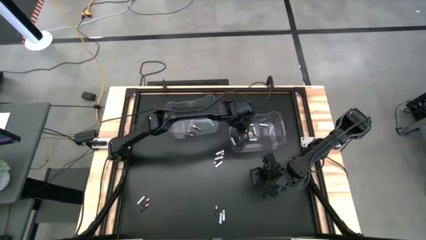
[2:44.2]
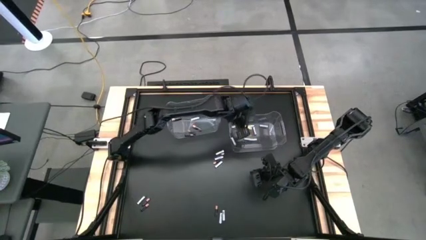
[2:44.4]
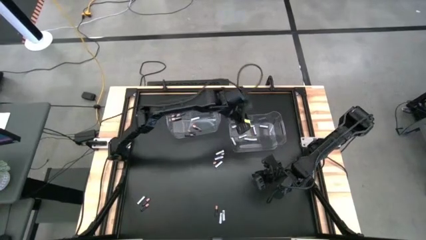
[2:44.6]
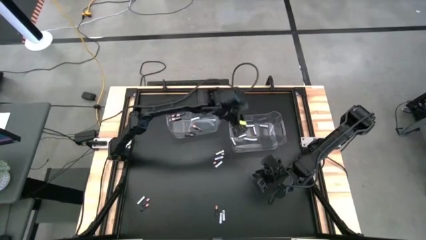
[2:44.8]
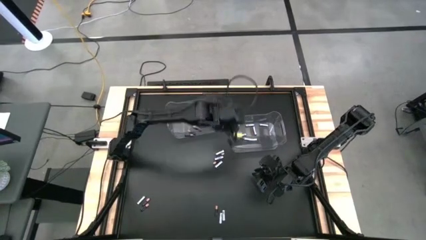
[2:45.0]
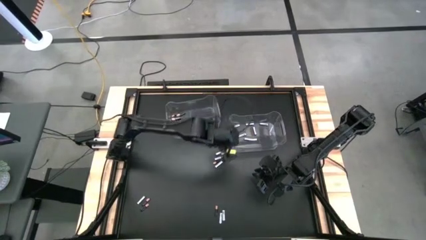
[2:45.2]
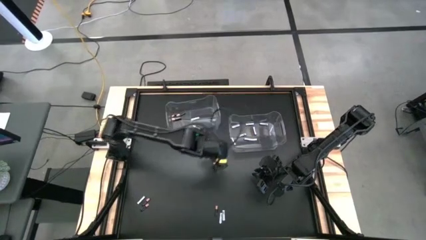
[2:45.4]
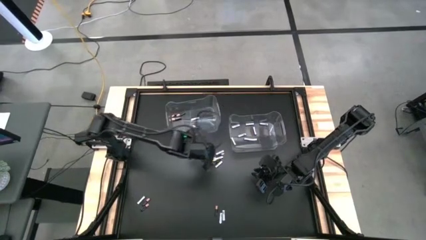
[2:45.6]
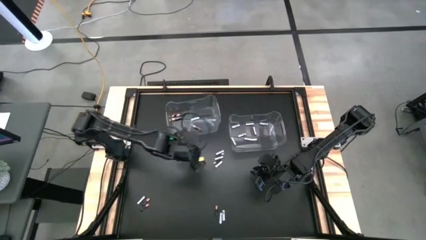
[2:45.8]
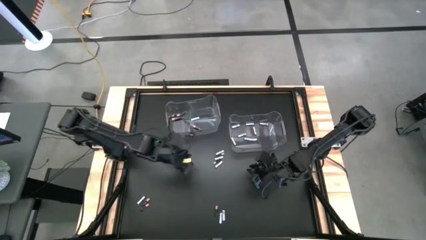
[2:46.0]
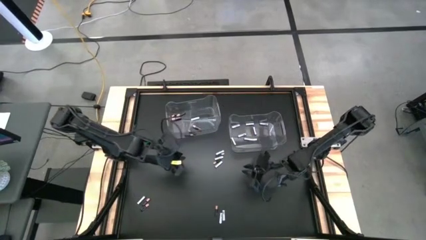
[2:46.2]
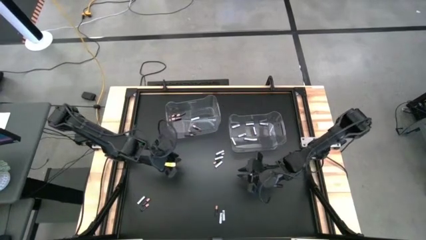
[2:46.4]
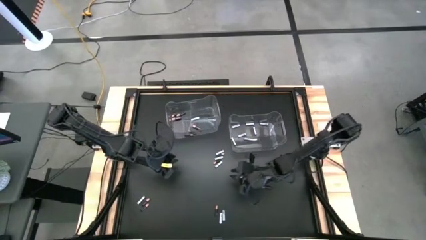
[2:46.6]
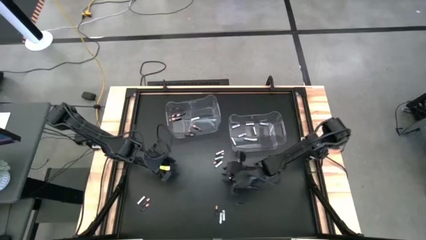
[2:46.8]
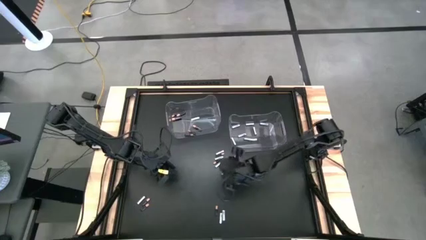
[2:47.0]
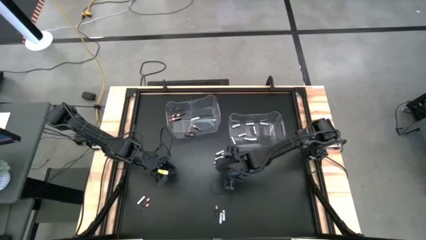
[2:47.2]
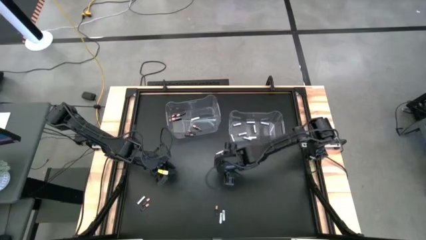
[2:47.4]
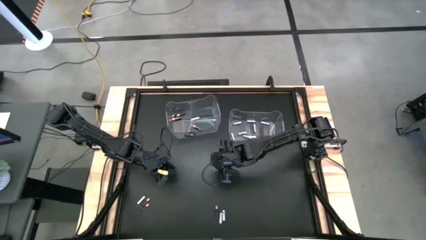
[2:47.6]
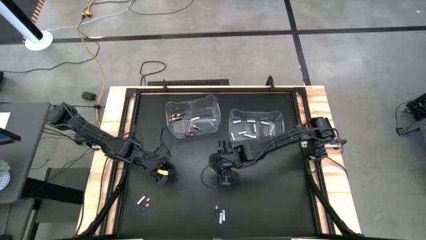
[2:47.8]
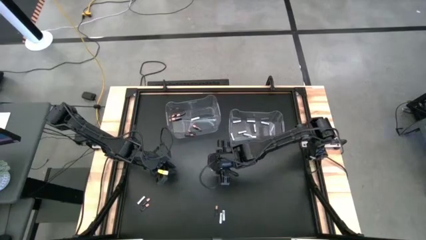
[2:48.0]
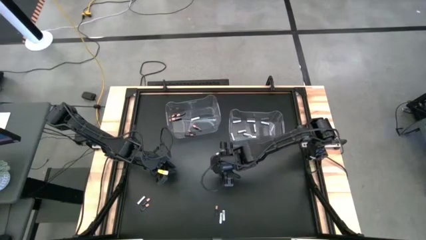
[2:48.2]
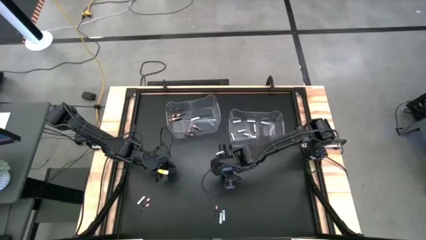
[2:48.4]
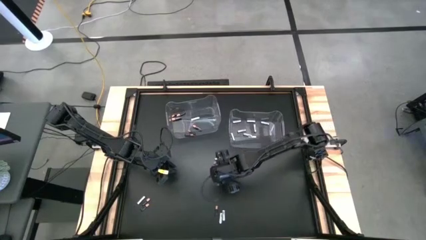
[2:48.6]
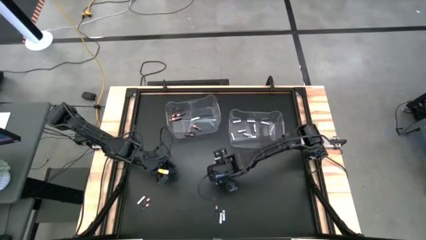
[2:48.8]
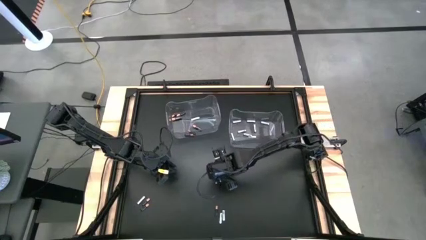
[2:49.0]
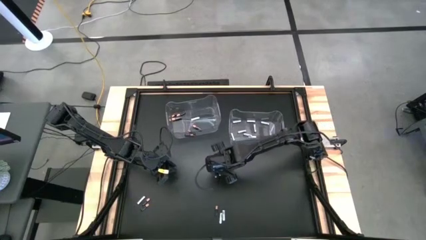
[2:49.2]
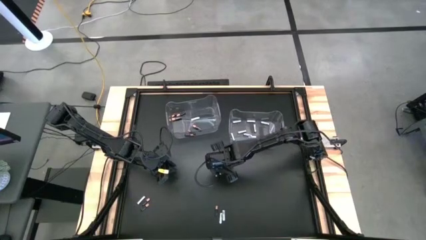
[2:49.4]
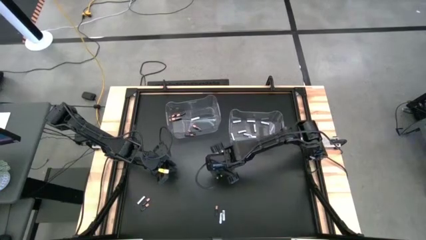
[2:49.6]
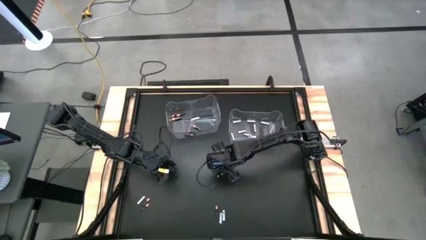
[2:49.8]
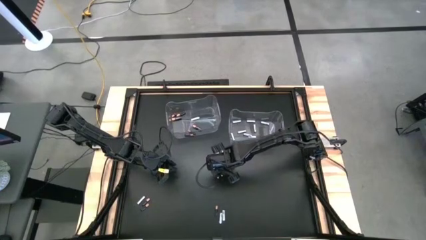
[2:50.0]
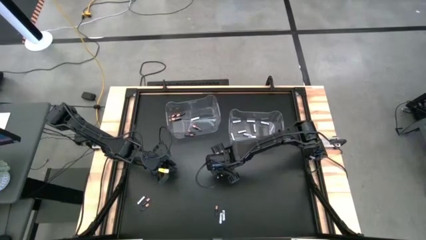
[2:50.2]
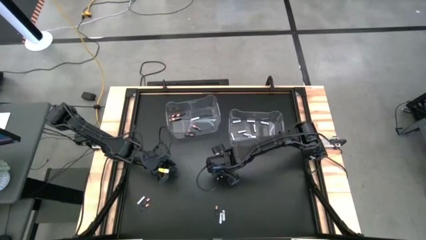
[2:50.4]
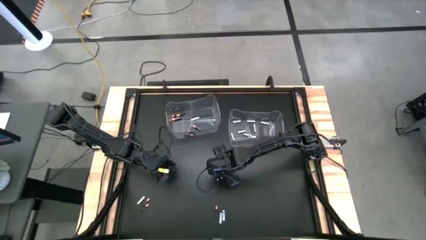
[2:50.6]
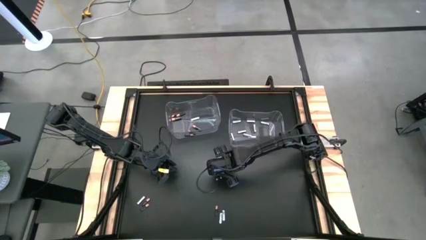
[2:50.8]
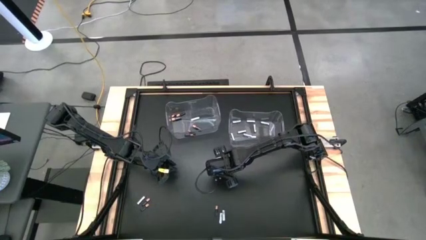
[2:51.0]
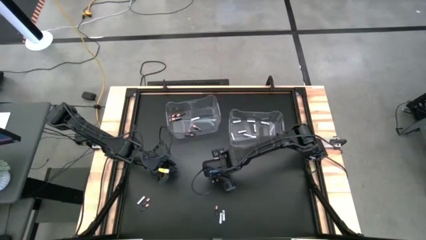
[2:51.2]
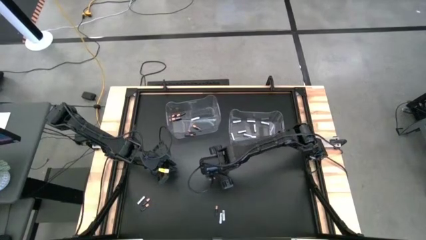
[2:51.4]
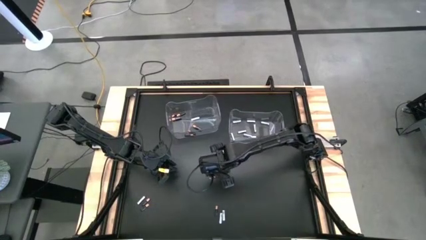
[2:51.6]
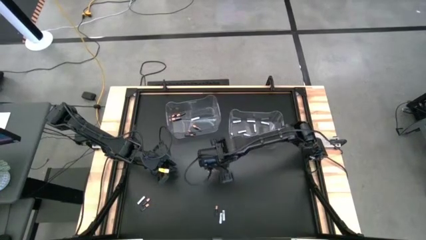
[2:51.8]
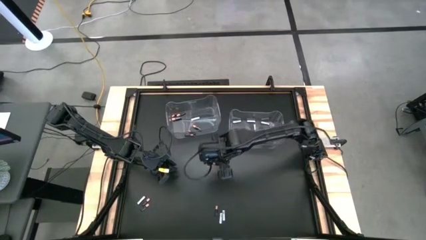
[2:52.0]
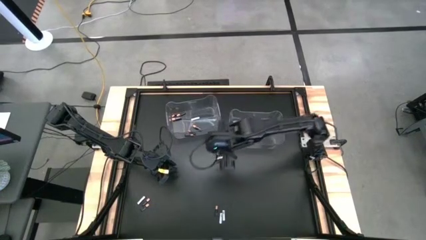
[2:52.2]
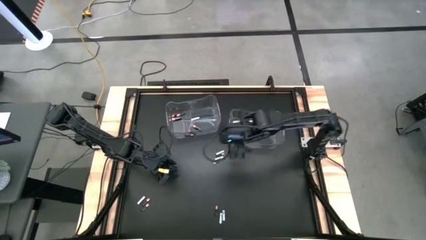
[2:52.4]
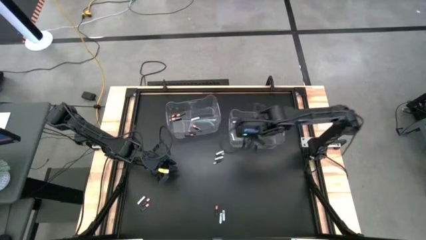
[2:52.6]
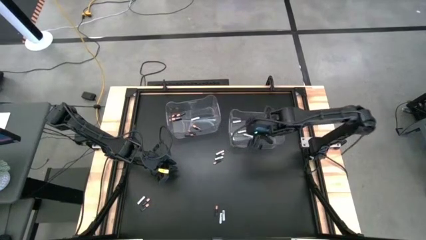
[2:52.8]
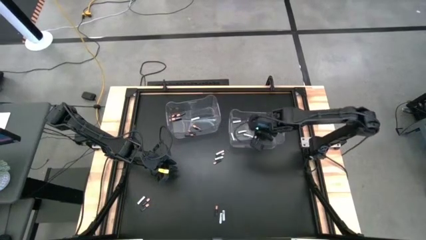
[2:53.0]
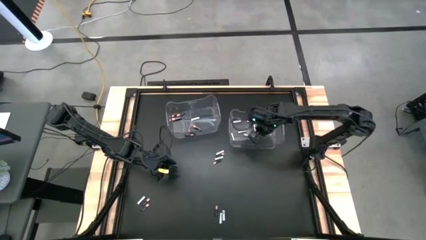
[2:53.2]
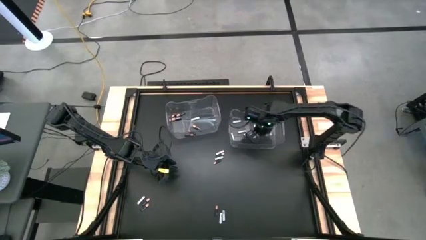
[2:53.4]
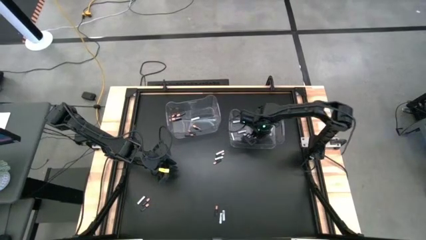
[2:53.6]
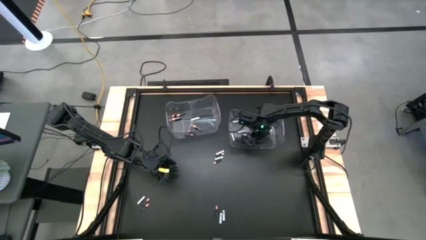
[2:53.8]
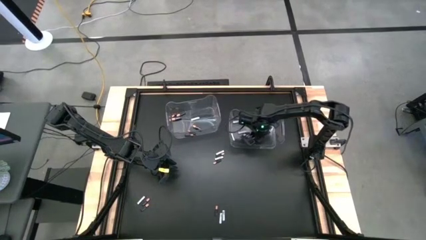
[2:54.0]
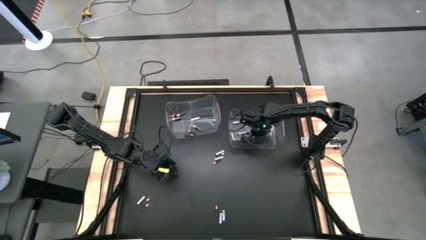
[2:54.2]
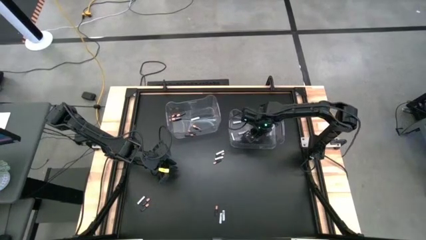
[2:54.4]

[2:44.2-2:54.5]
Task: Sort batteries
Put the white battery into the right transparent bin

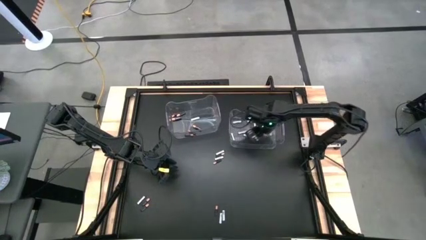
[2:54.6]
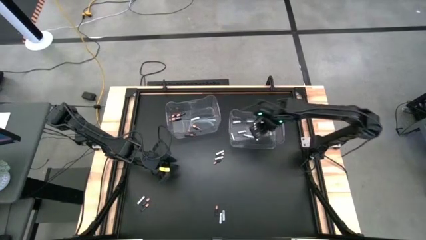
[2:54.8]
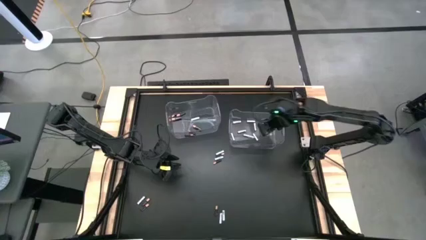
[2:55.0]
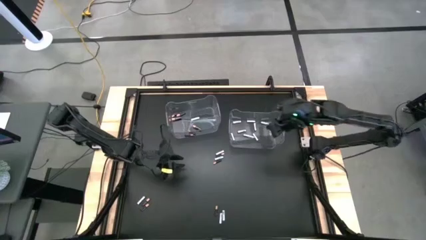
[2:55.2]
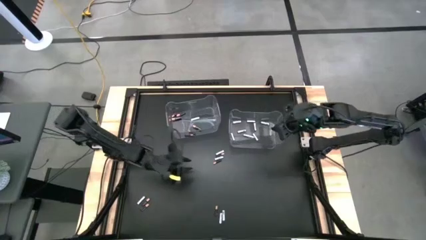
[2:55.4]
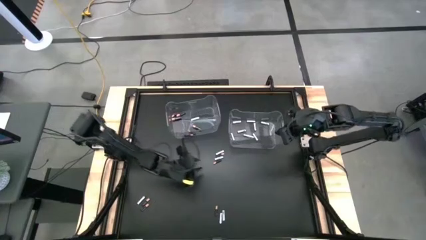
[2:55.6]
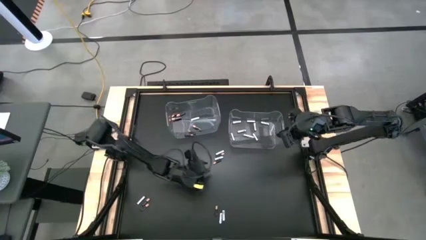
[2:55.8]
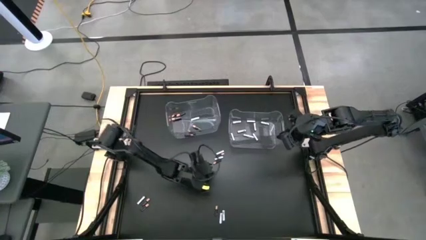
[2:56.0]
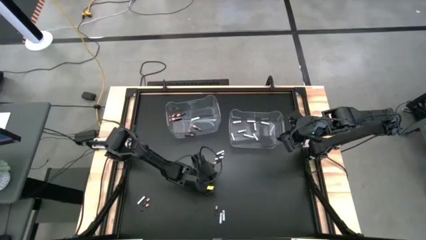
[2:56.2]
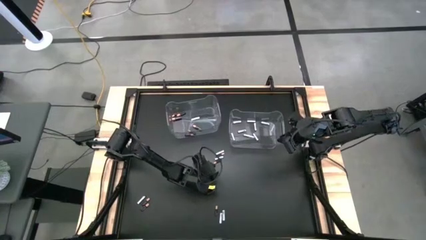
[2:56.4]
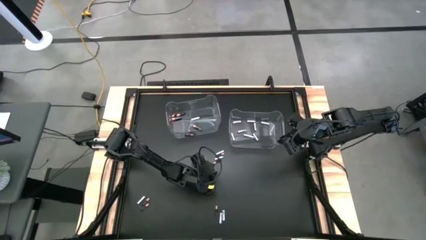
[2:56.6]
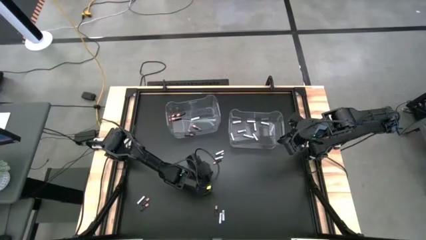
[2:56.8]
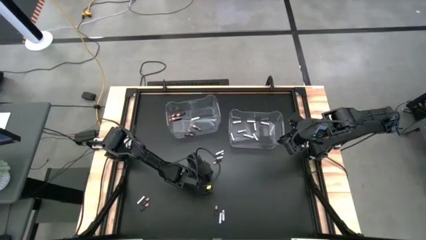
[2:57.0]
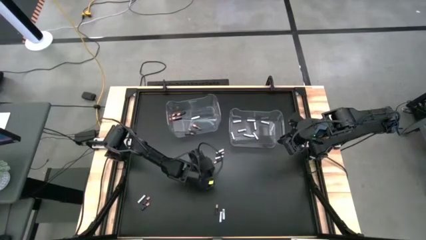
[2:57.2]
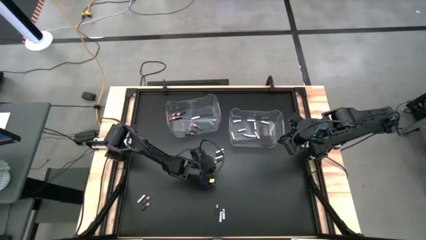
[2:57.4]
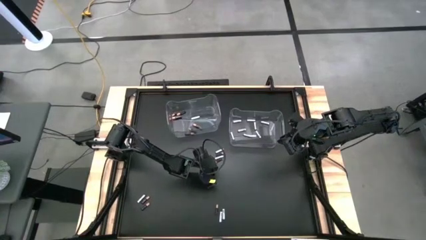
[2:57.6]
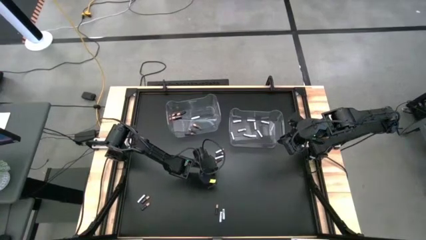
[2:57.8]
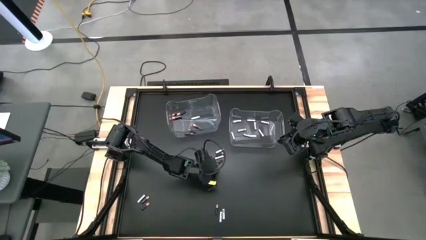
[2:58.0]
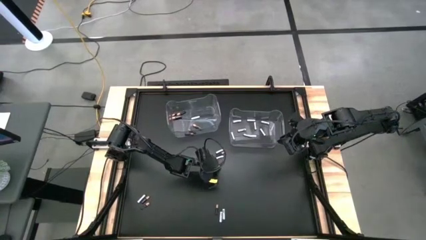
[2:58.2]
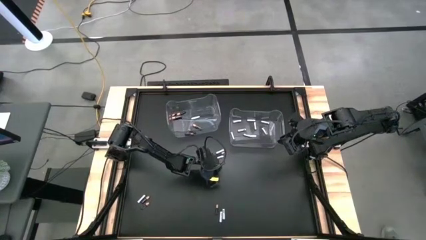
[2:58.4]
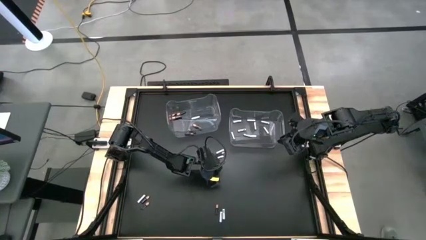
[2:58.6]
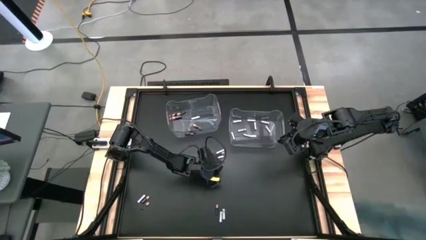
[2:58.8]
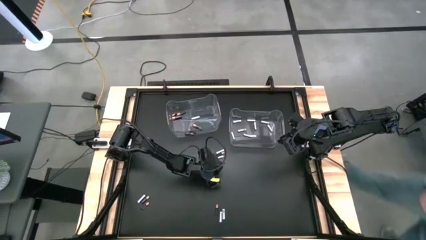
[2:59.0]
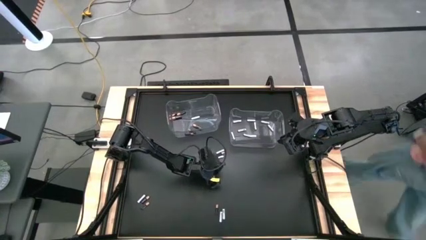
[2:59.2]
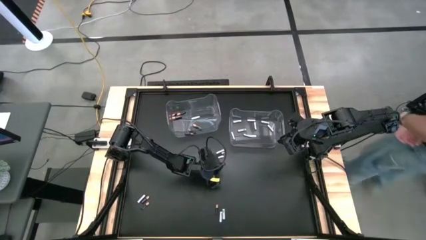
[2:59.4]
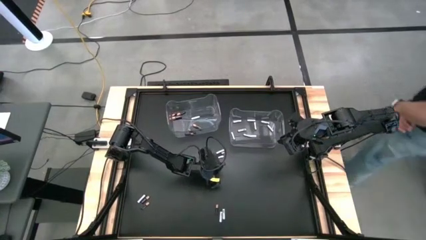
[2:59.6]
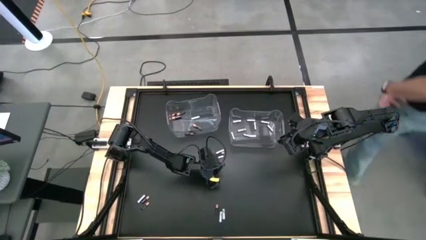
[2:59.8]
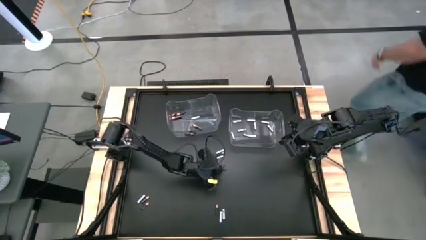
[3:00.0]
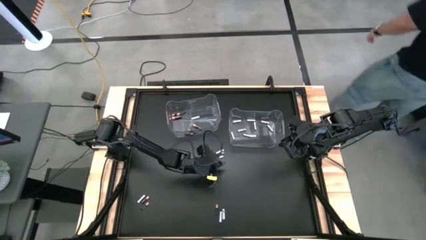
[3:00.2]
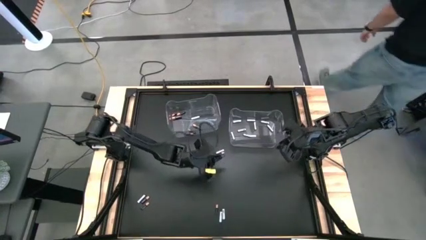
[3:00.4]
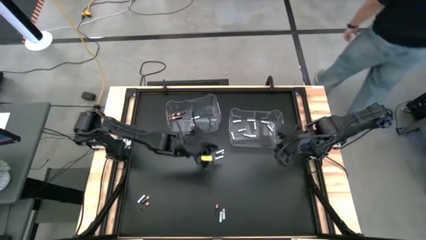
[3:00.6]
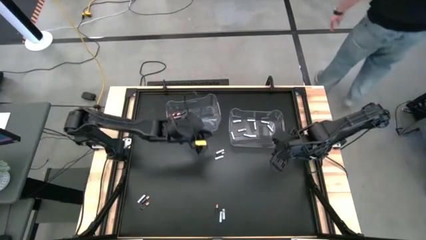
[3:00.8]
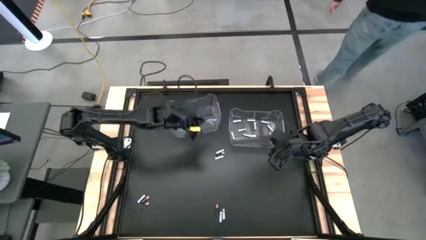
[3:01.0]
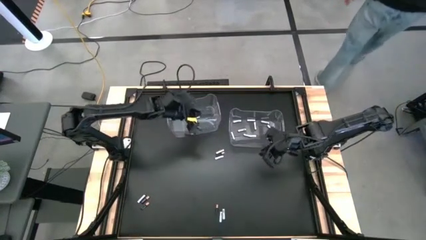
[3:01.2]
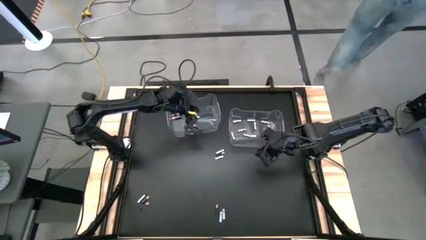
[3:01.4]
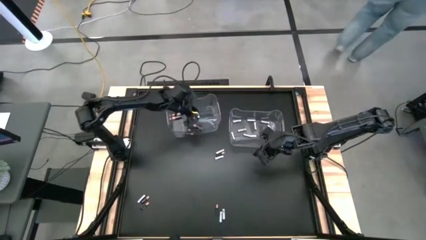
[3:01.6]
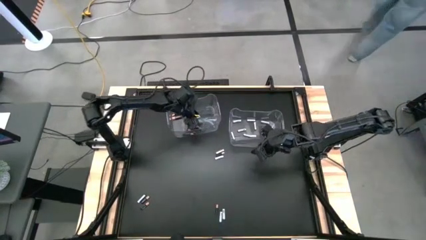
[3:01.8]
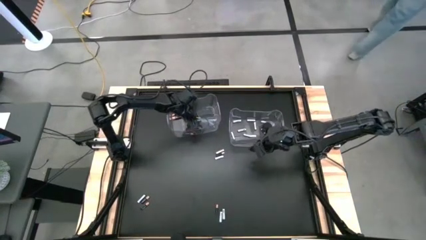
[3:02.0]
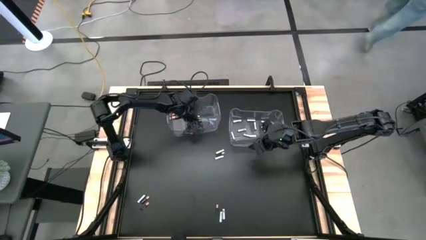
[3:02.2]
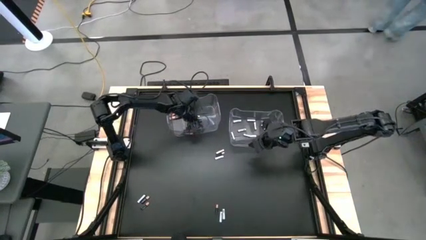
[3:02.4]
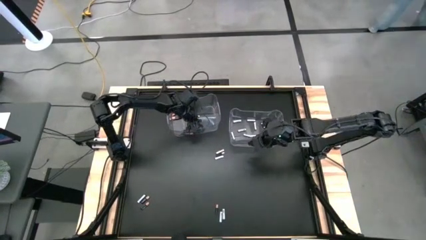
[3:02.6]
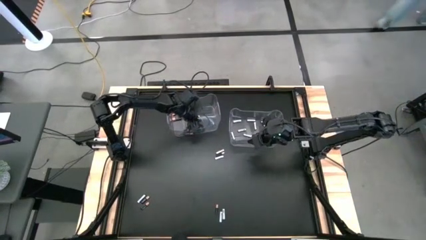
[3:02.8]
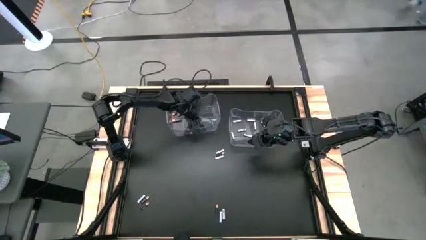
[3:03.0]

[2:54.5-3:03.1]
Put the black battery into the left transparent bin
